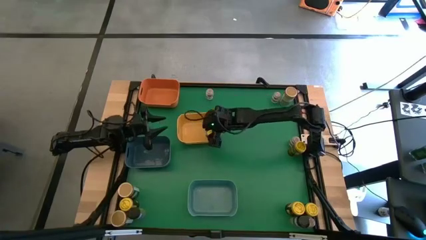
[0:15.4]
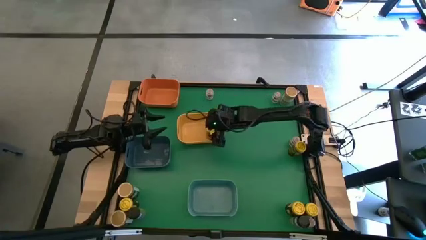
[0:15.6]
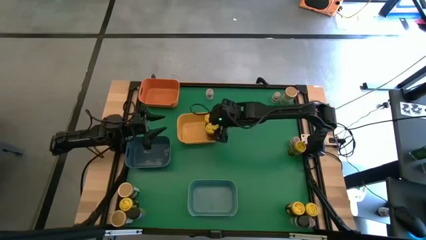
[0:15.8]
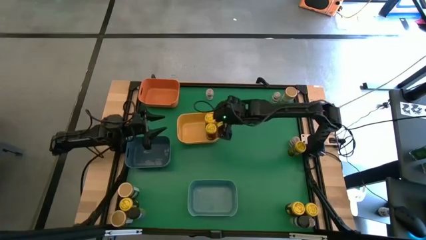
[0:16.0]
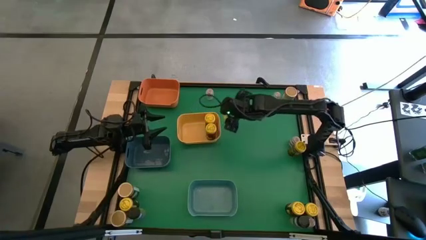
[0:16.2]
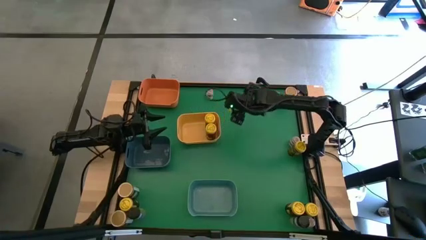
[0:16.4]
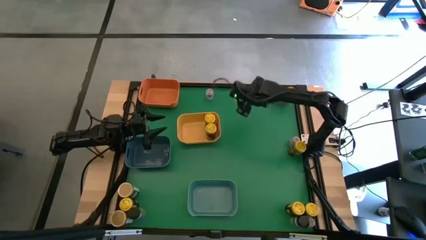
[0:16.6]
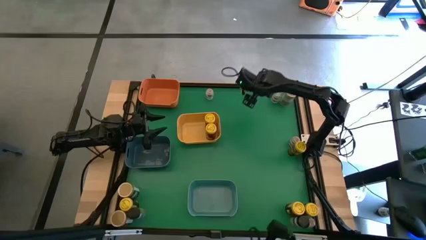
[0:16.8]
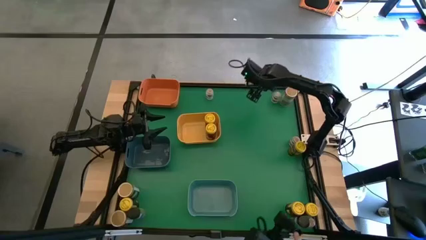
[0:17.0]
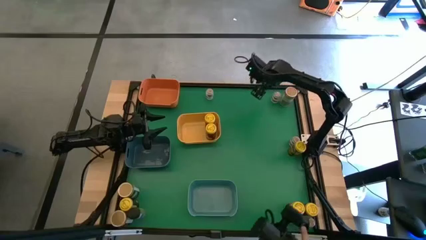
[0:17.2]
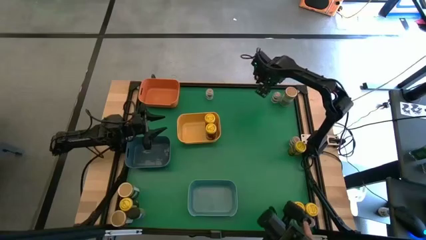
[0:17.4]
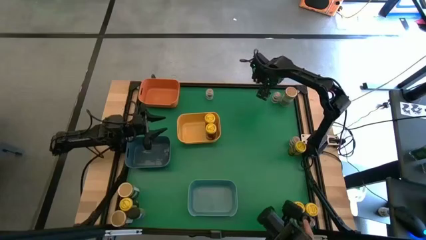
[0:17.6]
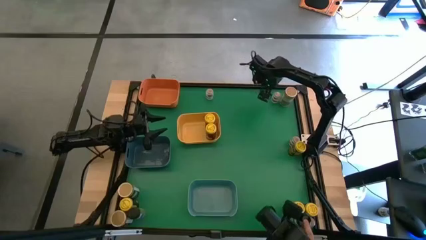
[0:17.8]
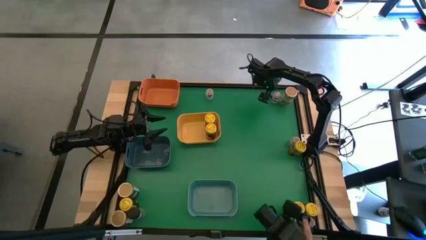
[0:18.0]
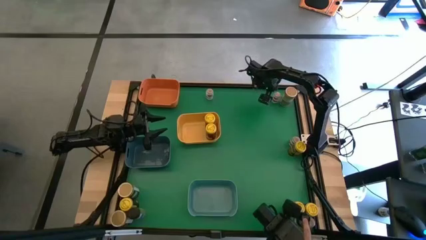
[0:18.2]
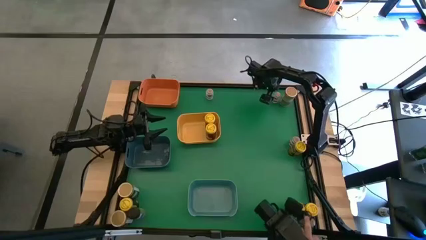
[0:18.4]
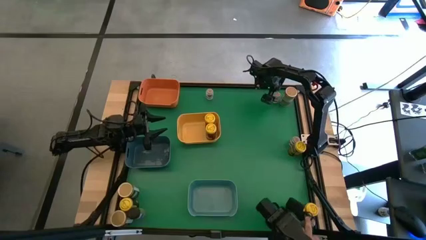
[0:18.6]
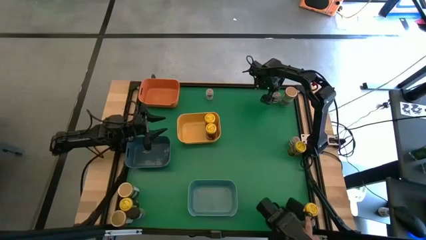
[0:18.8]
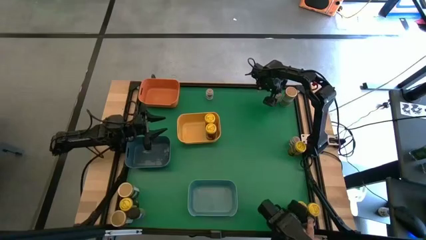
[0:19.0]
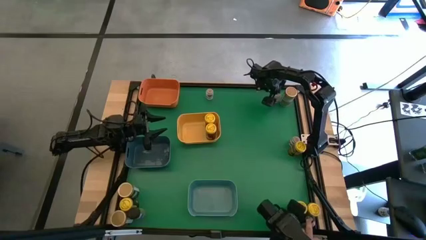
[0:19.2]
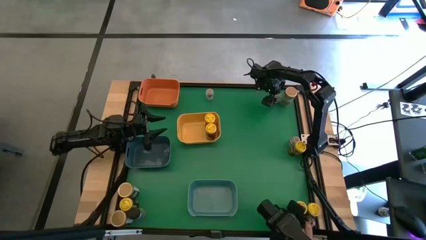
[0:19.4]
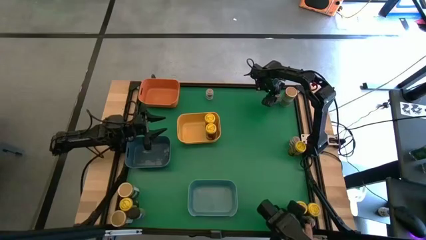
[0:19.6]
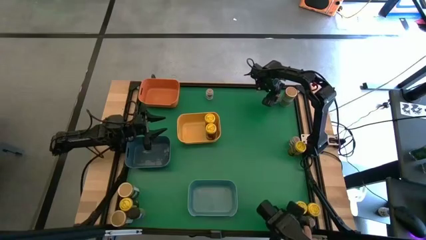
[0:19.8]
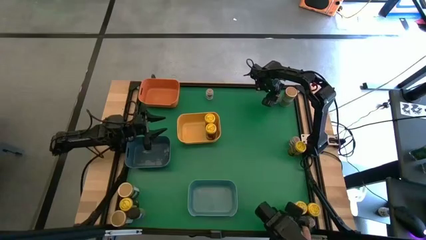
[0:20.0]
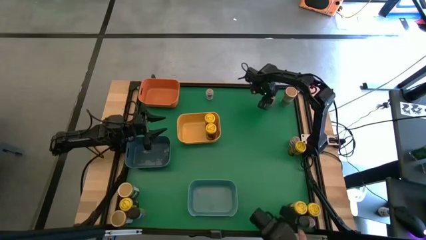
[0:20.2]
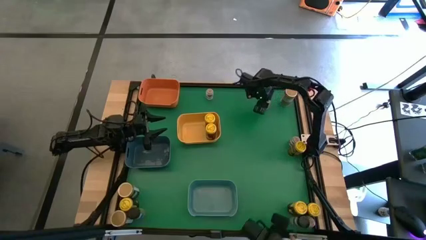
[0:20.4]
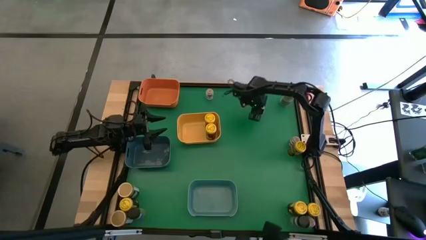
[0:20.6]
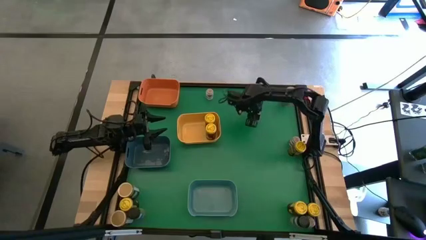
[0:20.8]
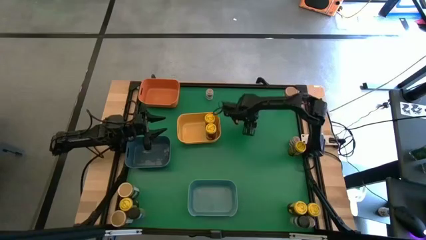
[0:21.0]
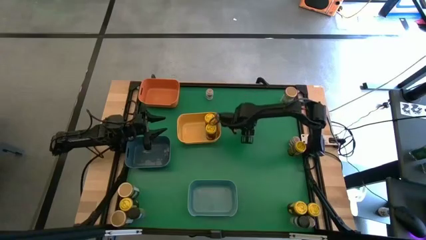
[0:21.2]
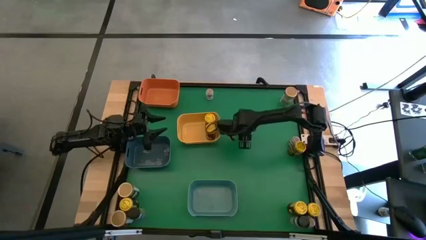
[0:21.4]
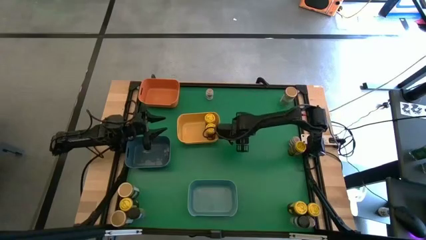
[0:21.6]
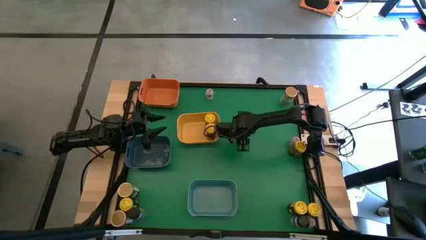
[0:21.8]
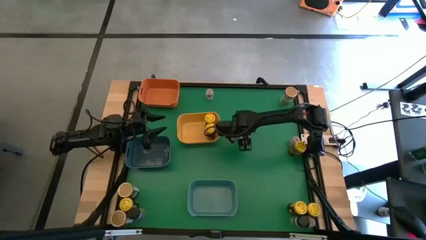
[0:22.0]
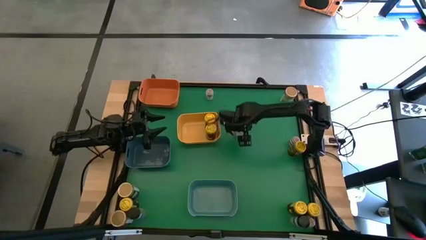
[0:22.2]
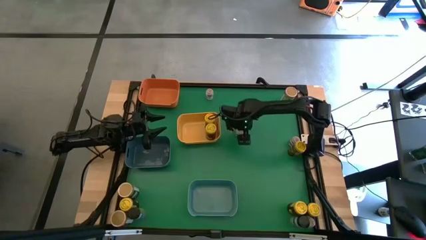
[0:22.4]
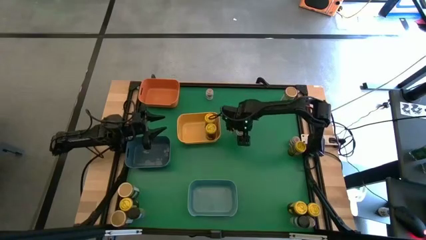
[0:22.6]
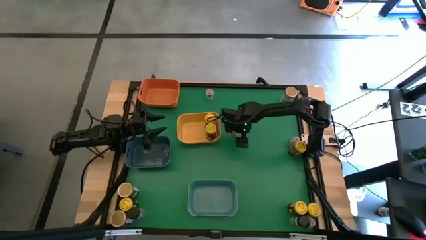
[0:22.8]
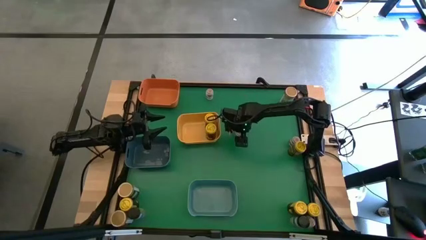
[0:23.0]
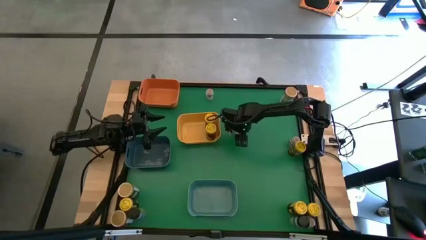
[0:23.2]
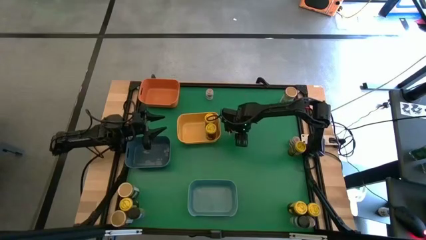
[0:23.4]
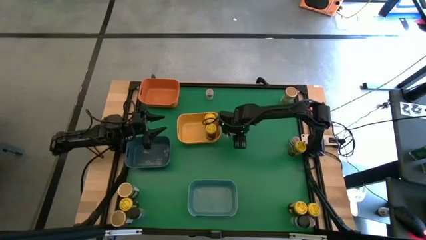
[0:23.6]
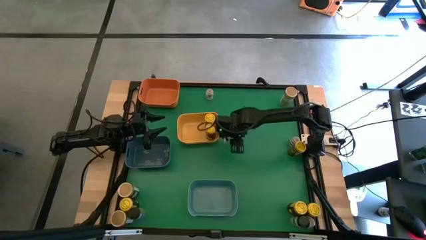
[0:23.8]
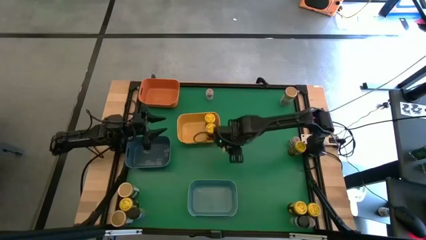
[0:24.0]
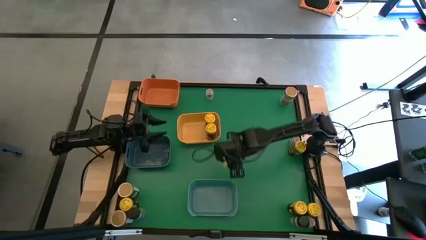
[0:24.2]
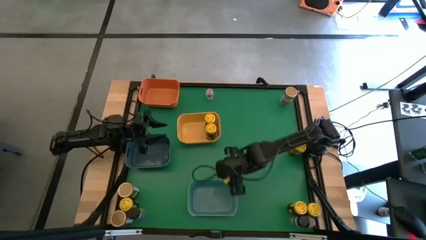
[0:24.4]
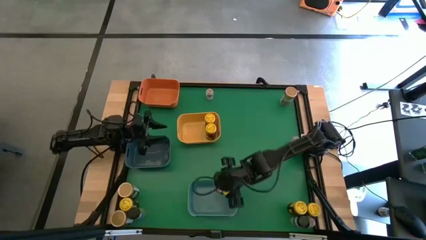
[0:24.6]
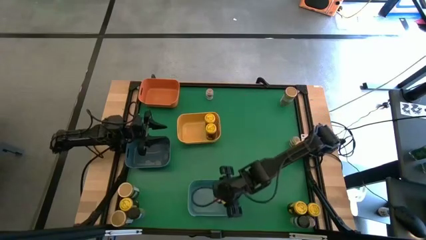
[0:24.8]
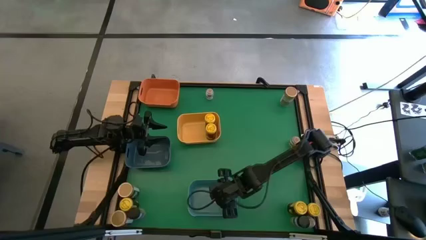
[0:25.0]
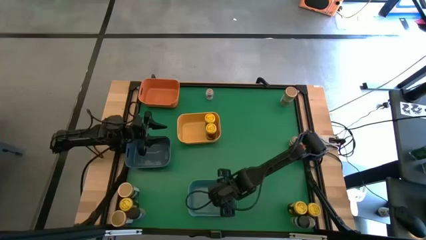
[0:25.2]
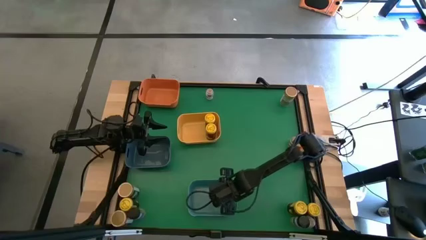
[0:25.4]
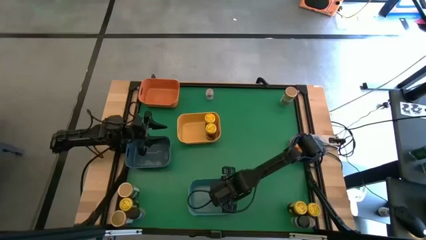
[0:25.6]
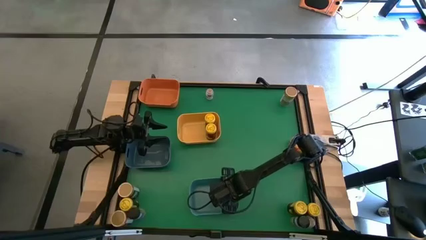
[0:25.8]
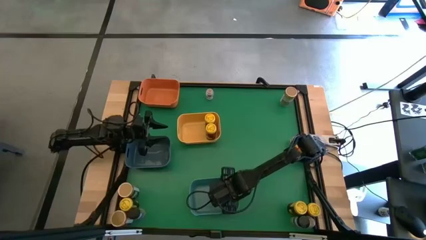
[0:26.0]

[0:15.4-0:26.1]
Task: Sort spices by type
Put the white transparent seasoning bottle into the light blue bin
